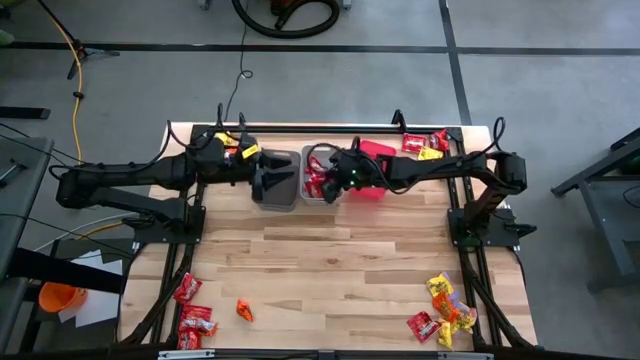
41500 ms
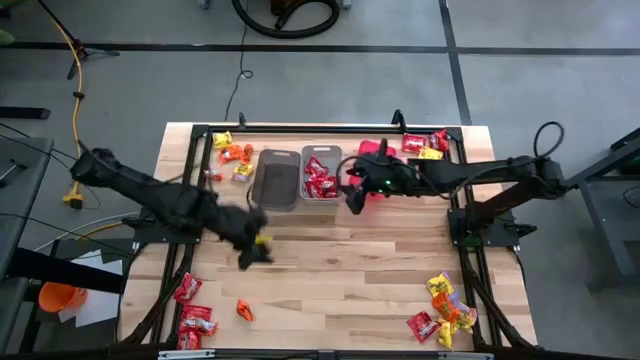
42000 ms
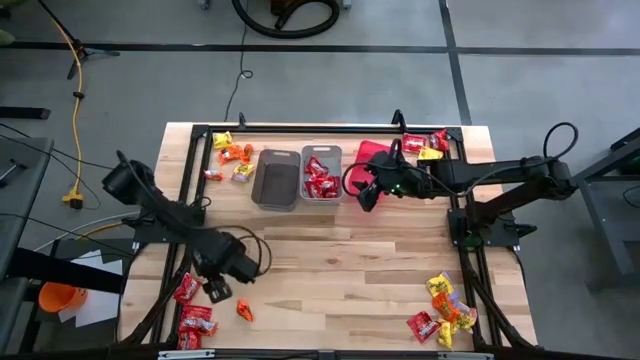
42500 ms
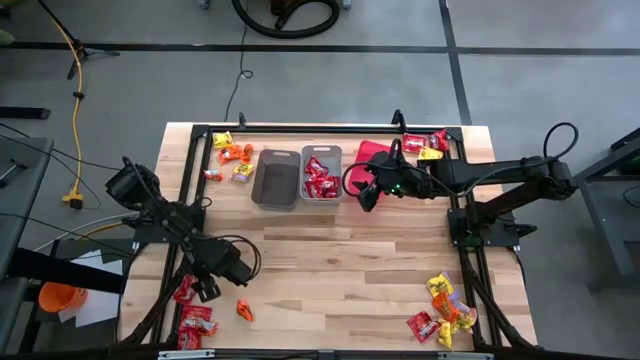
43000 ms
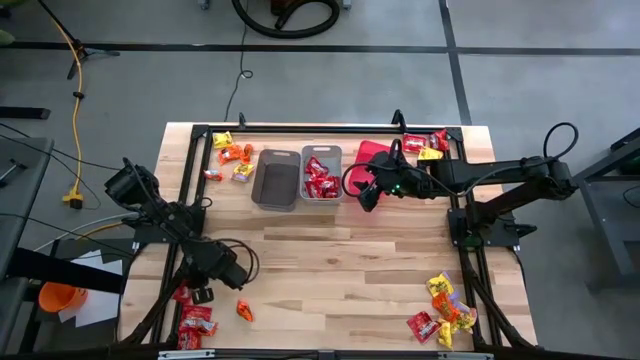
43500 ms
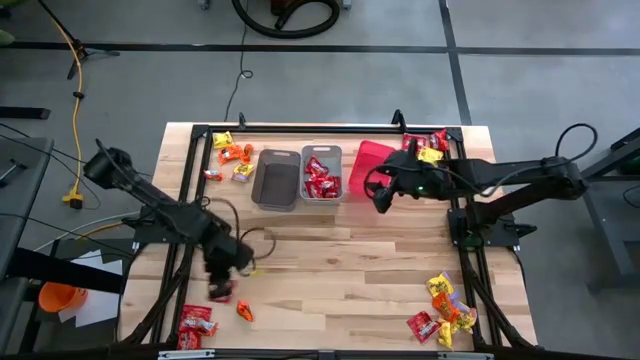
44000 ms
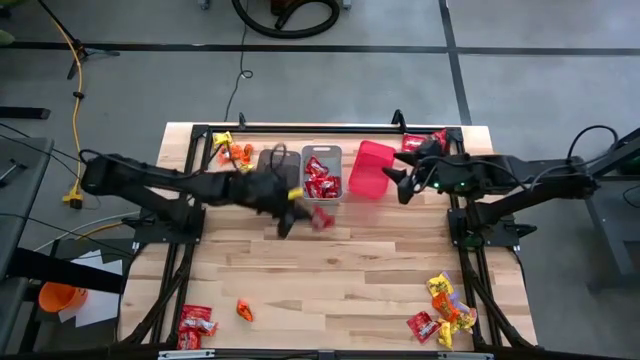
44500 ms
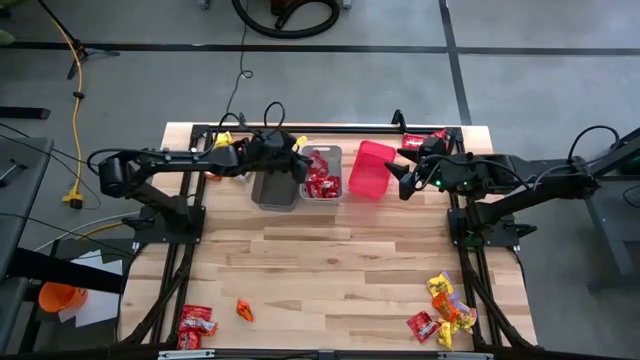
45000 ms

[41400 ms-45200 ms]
Task: Sort candy
Put the bottom left red candy into the gray bin

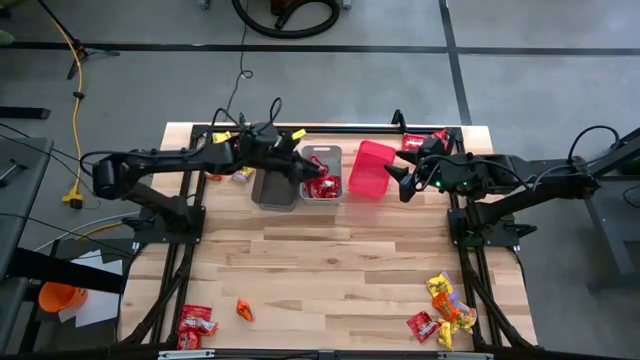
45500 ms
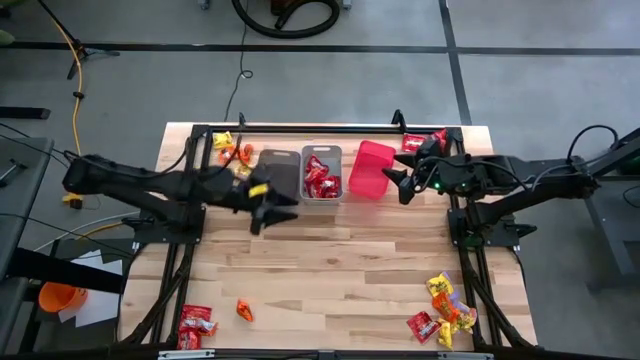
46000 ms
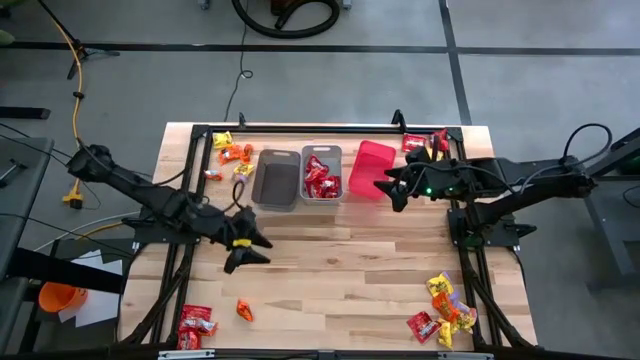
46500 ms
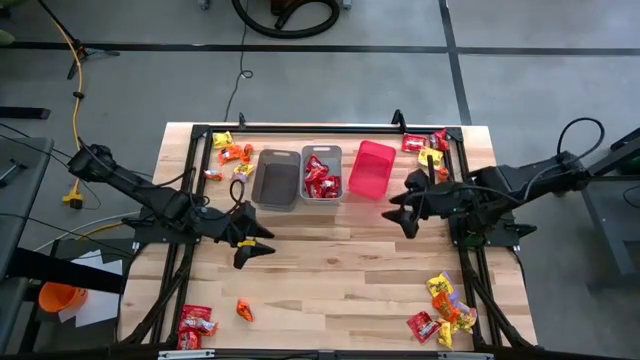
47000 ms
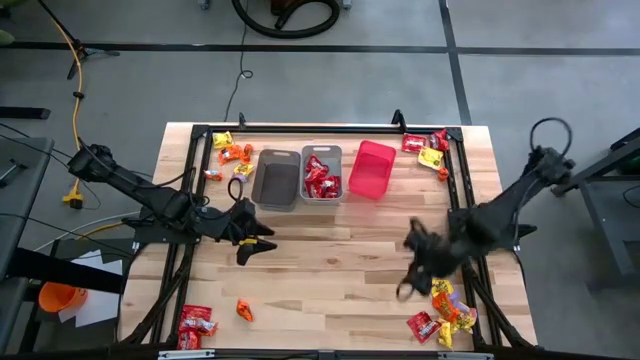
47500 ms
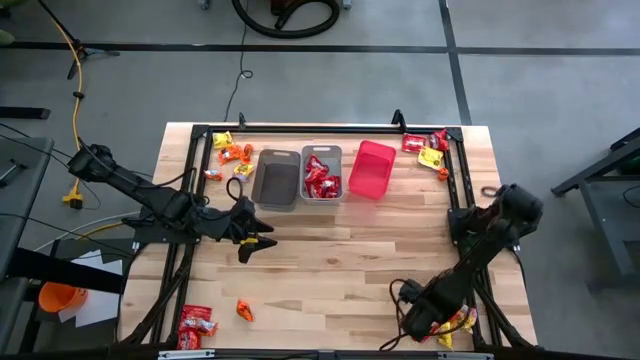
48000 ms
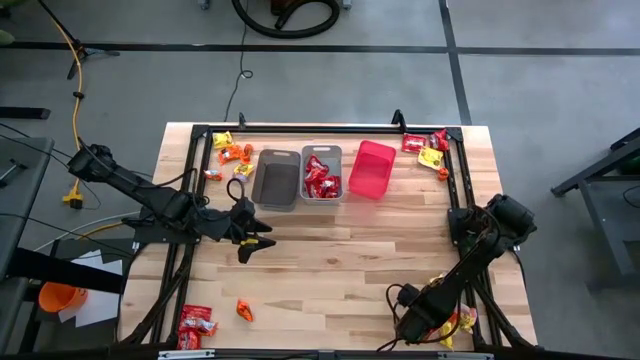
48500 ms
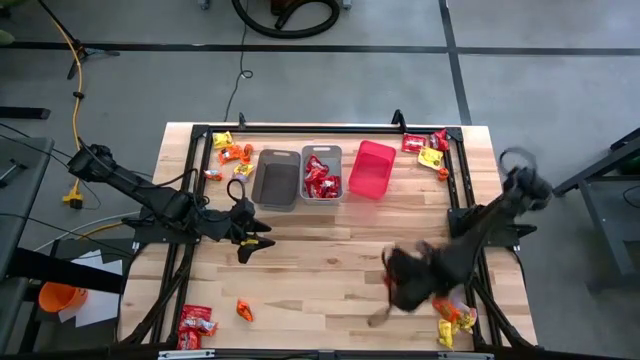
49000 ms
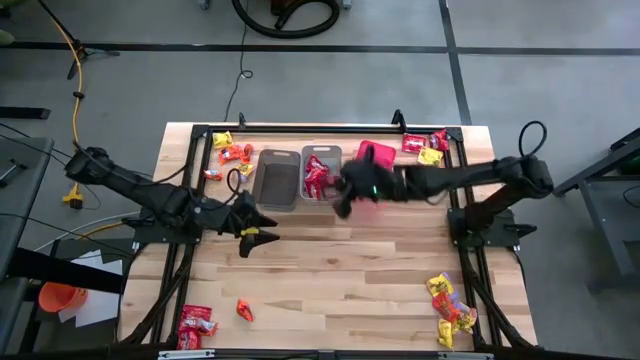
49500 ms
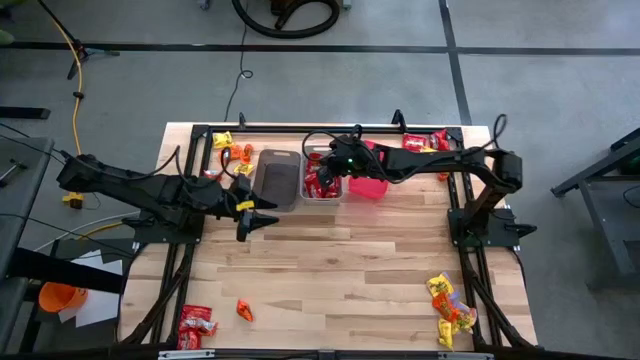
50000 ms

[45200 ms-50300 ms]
Put the bottom right red candy into the gray bin

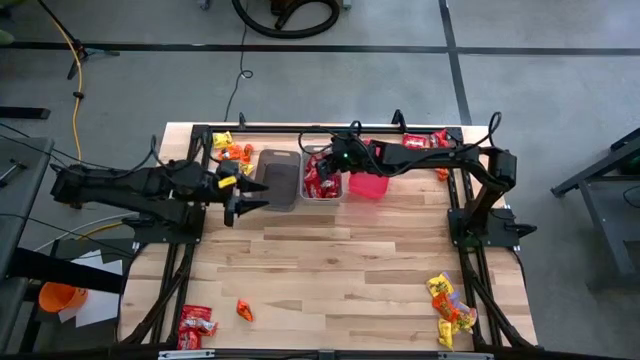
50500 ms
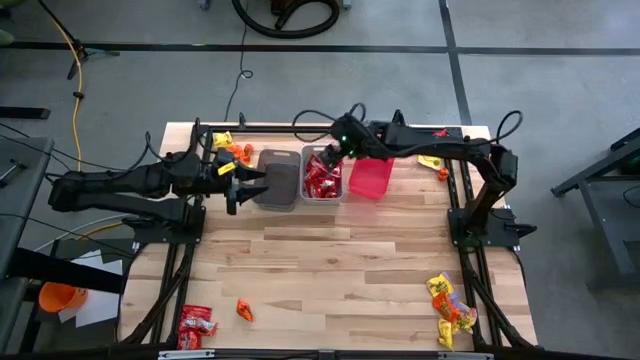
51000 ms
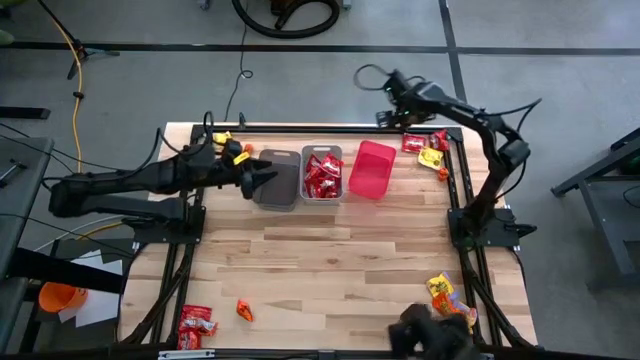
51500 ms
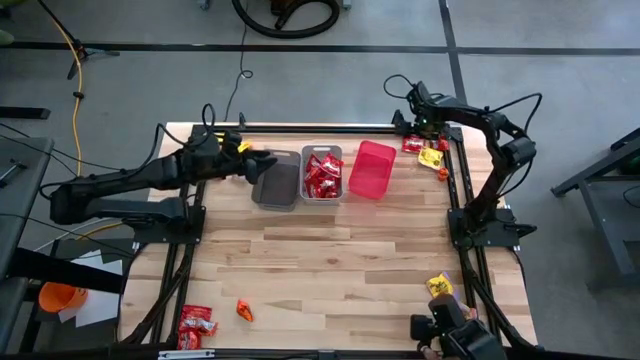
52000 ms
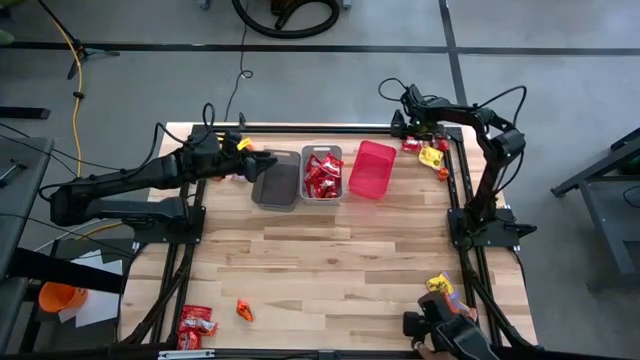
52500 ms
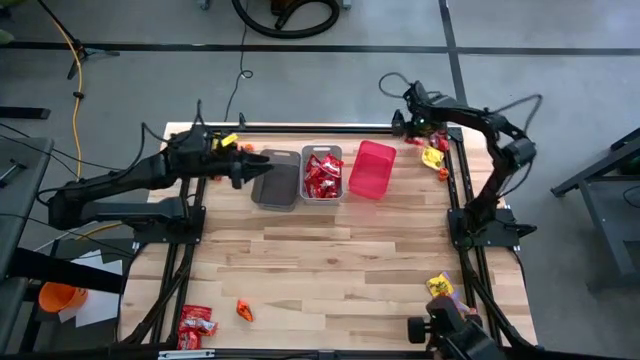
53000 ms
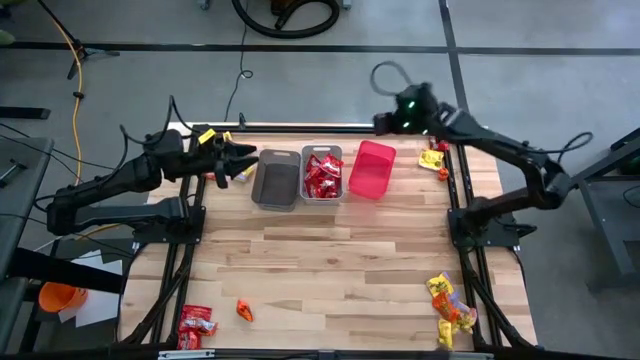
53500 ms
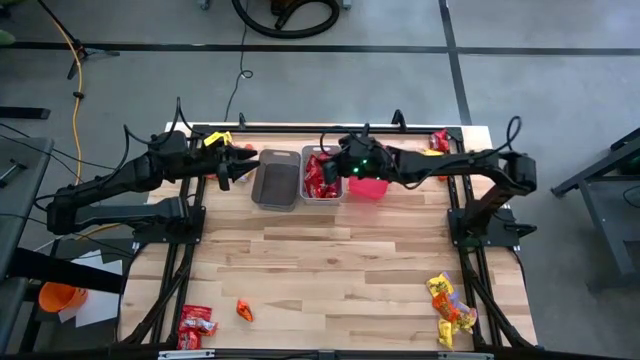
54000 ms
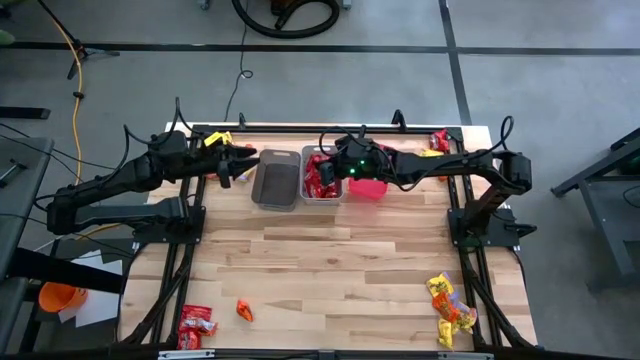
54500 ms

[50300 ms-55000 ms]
Put the top right red candy into the gray bin

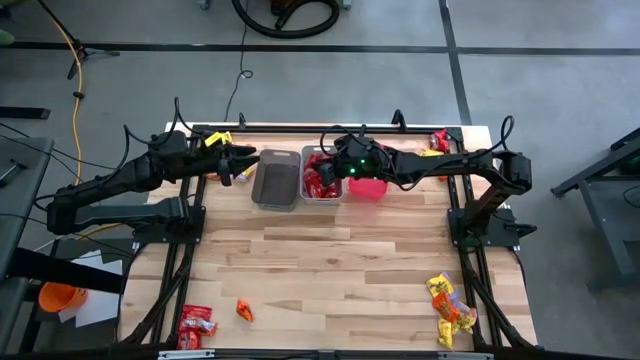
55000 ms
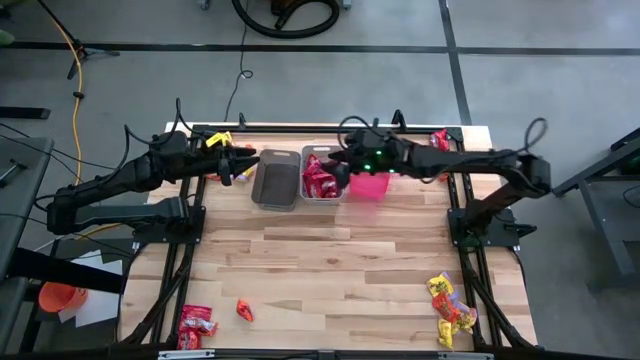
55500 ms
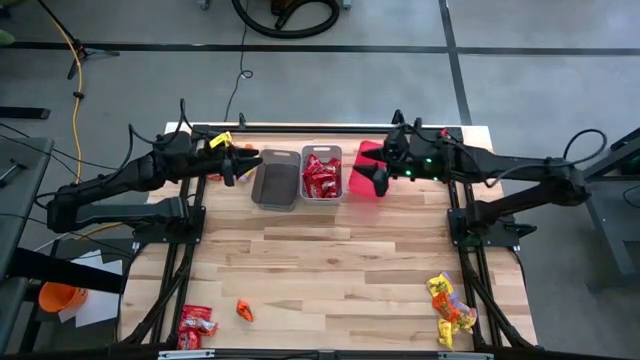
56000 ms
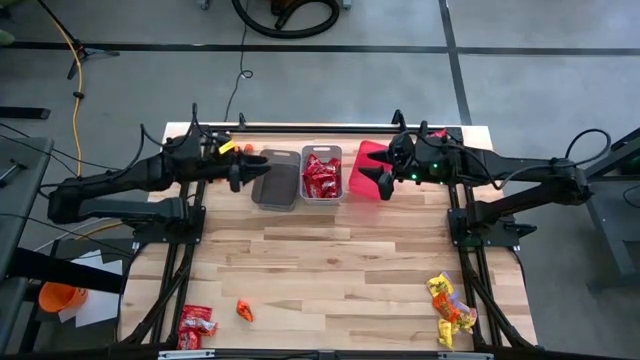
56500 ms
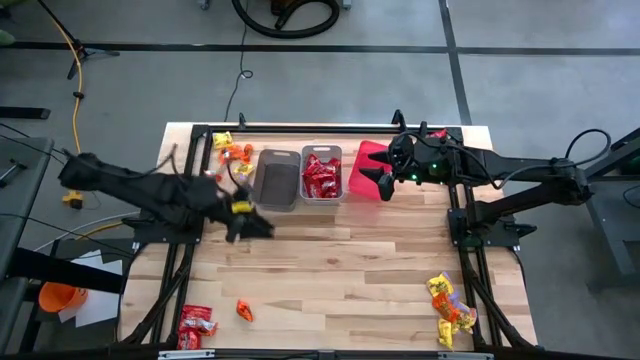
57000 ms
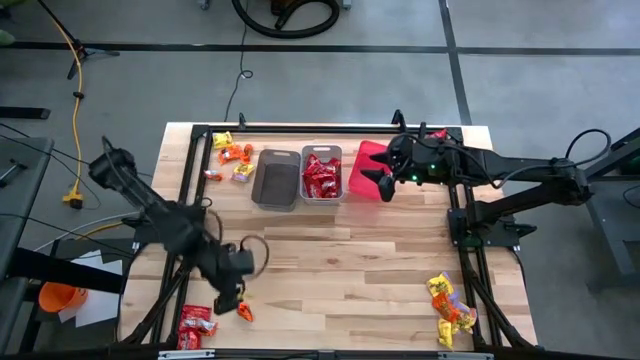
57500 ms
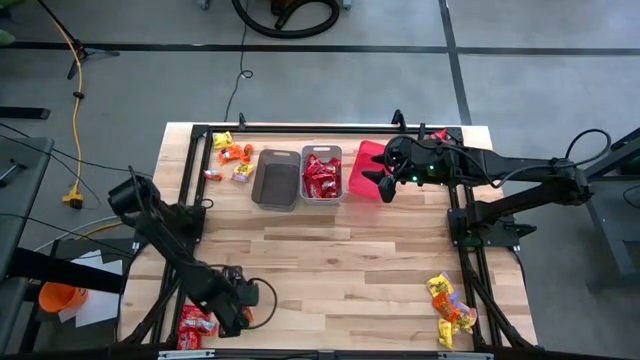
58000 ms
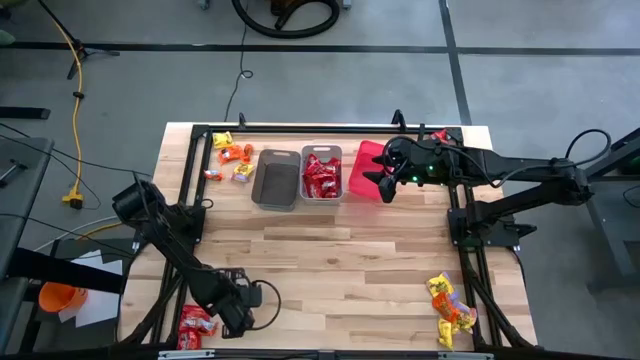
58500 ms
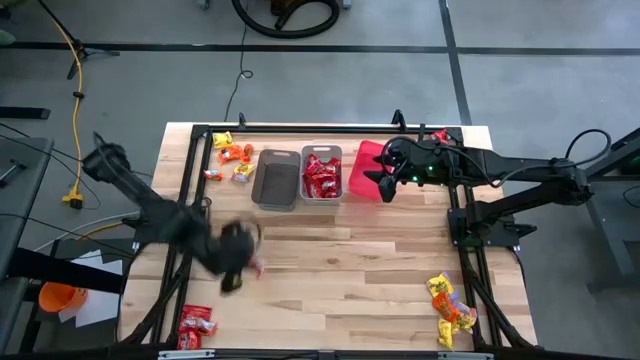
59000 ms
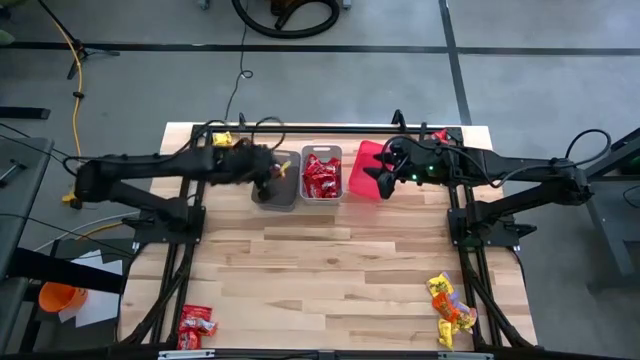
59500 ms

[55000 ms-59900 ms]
Put the bottom left orange candy into the black bin

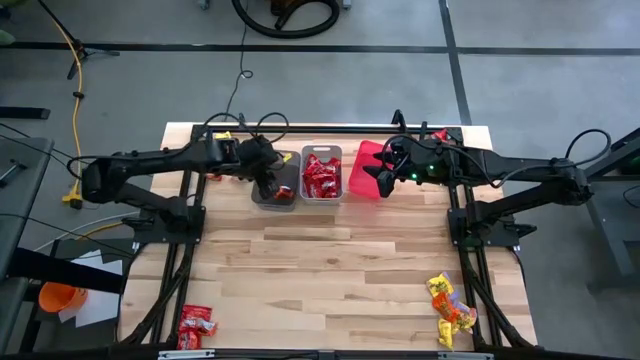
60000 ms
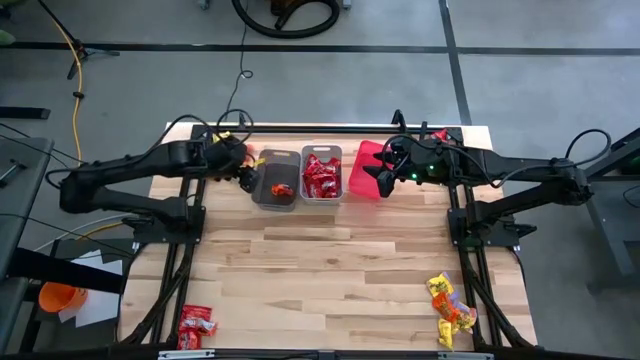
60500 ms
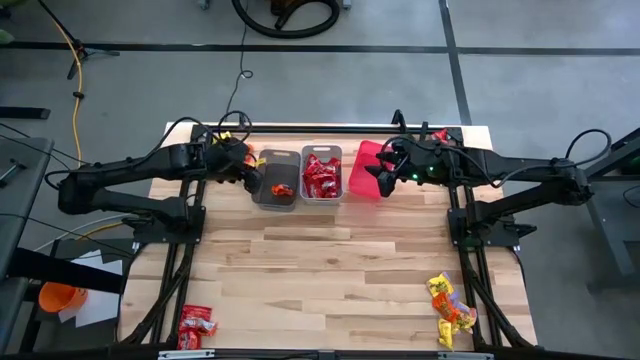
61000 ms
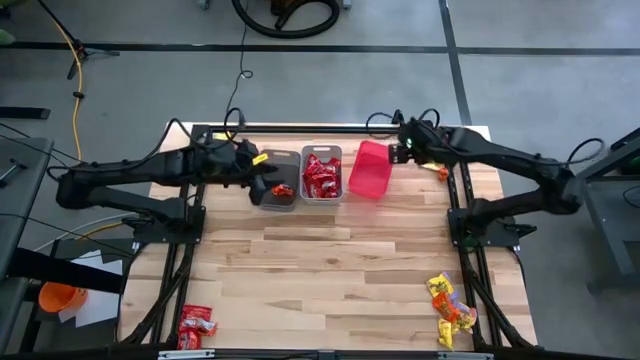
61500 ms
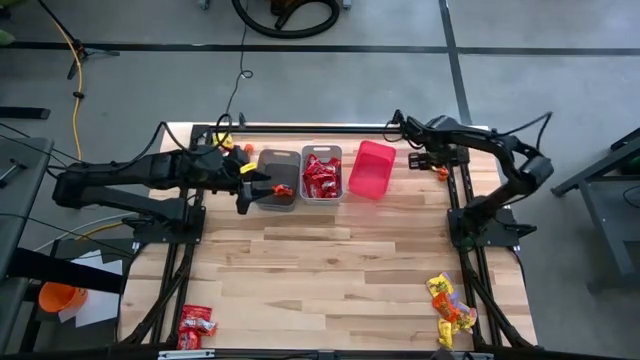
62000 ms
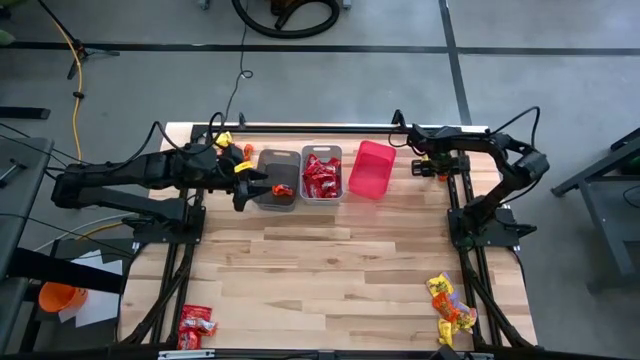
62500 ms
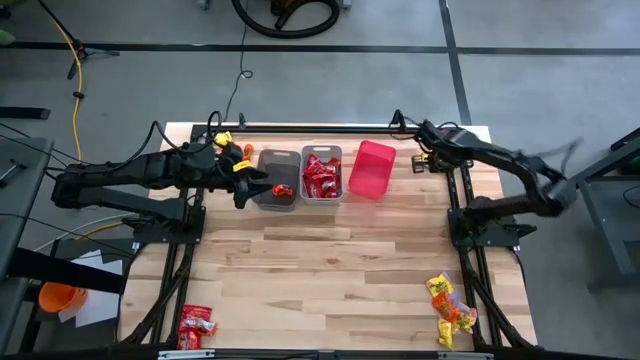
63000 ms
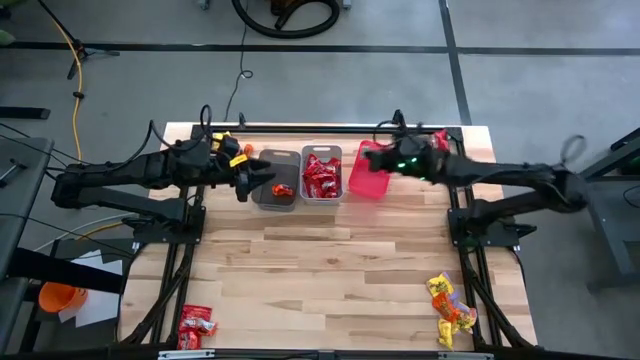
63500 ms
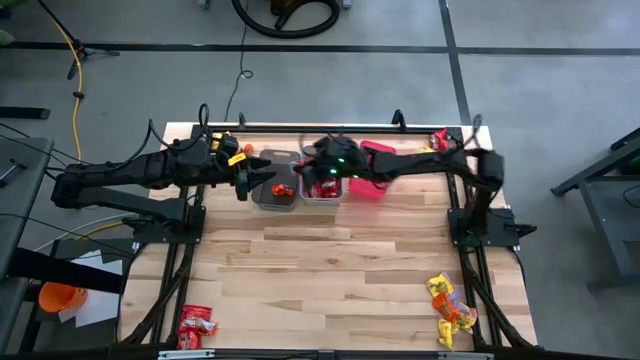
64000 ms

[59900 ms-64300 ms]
Put the top right orange candy into the black bin
